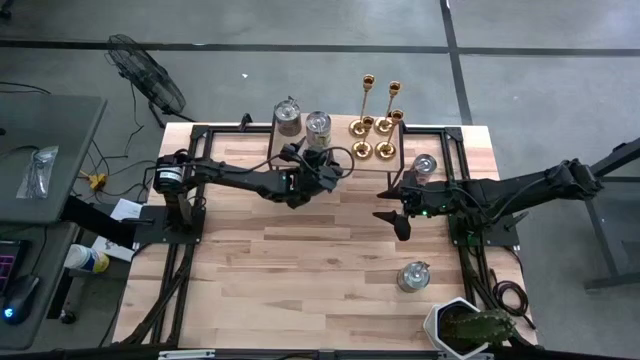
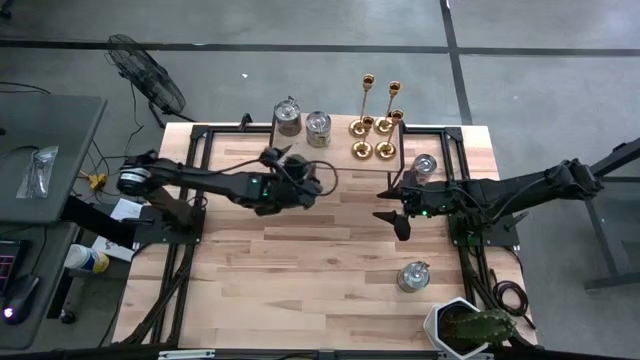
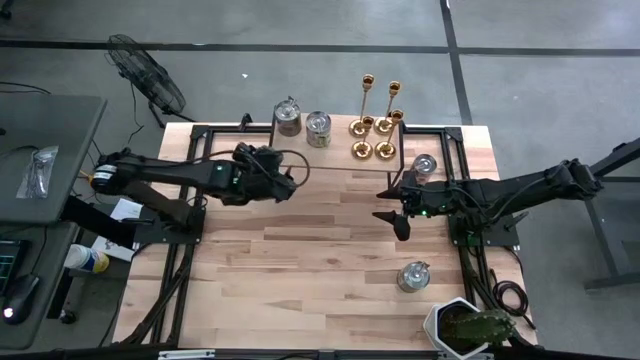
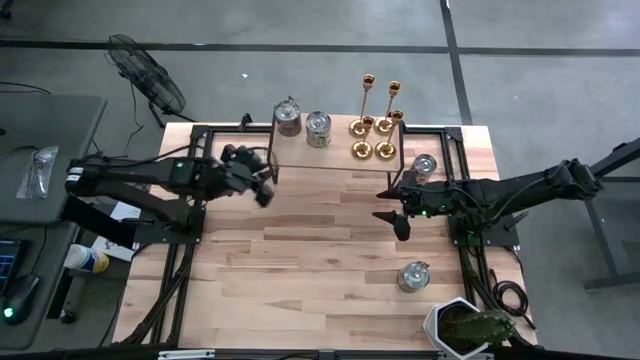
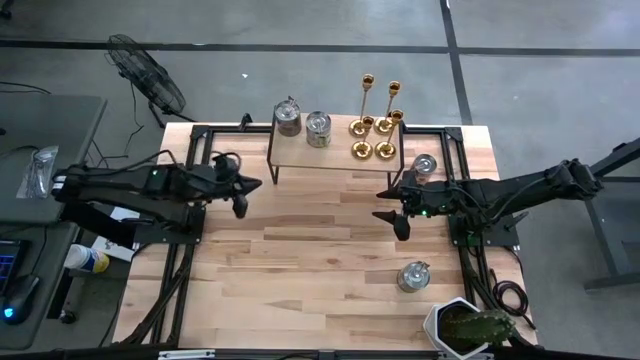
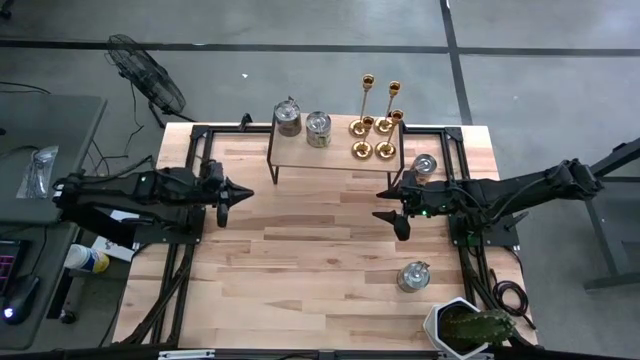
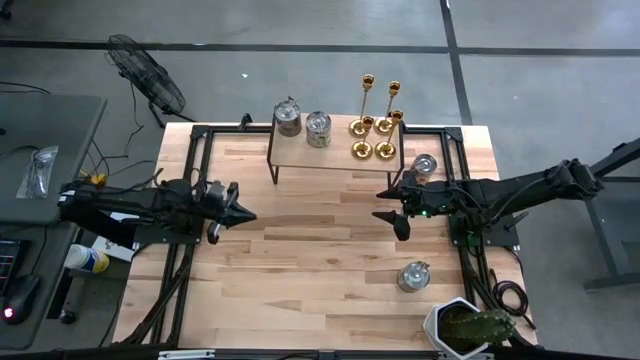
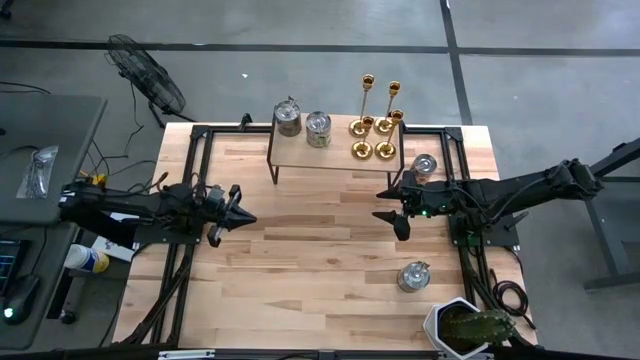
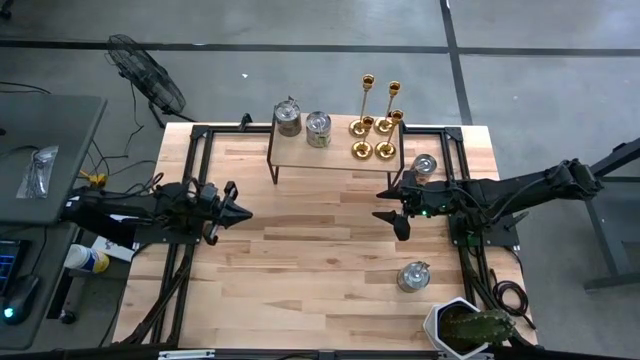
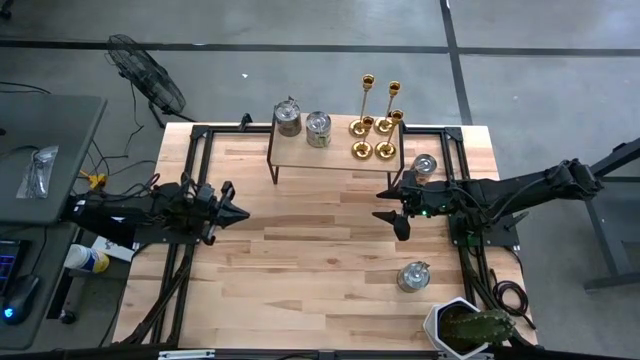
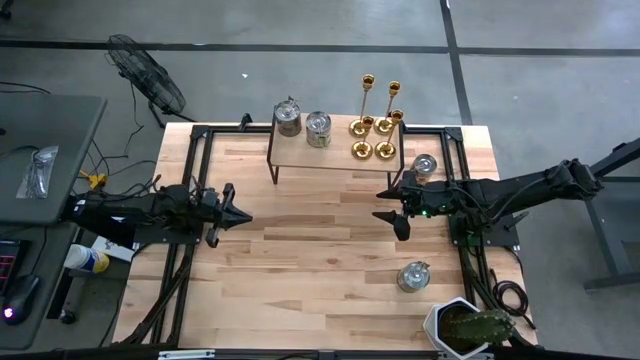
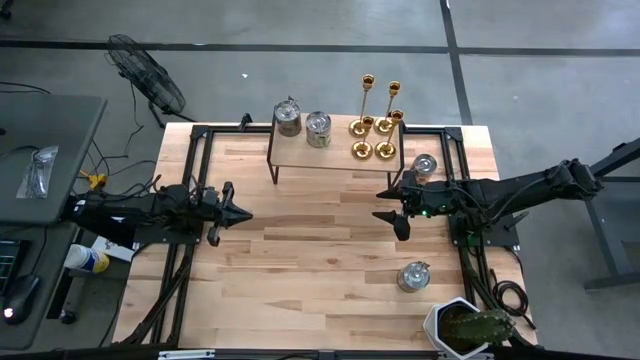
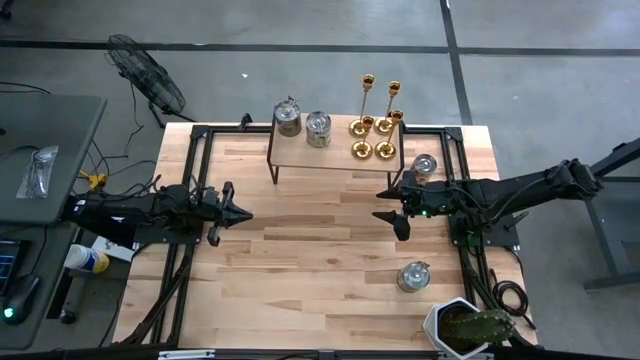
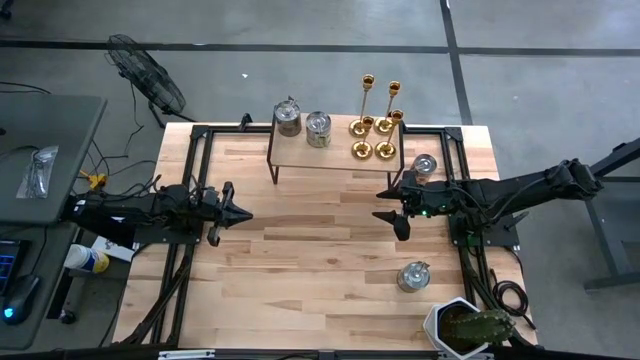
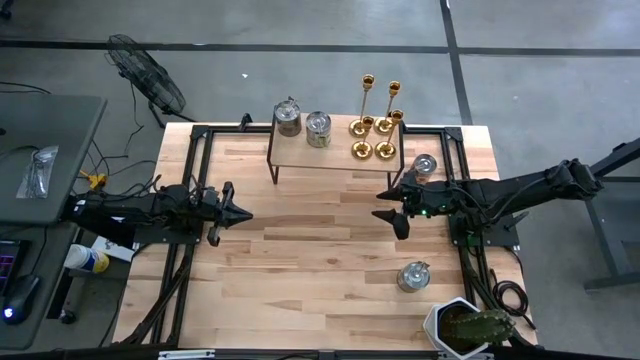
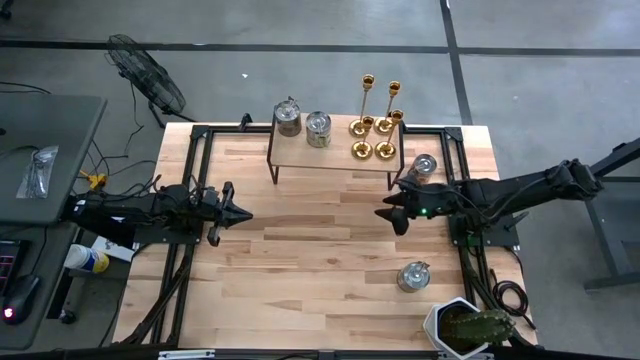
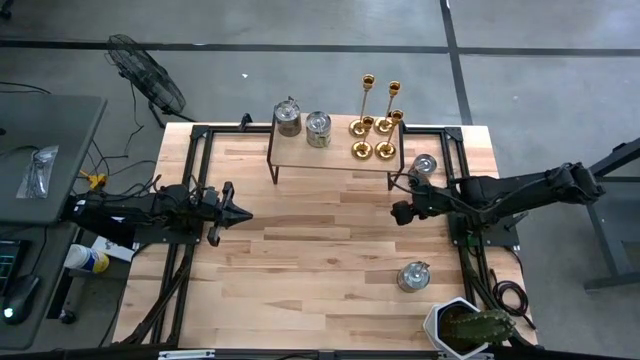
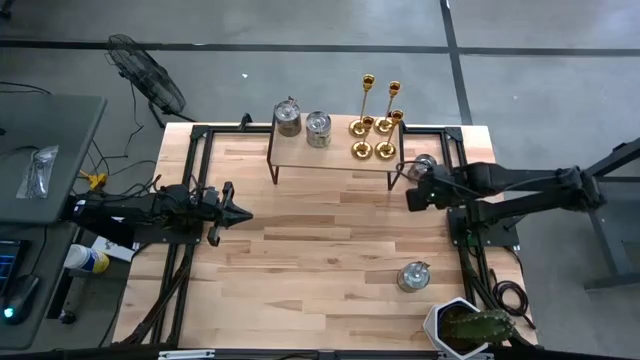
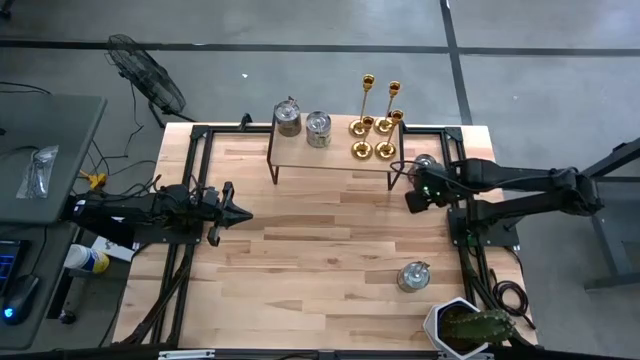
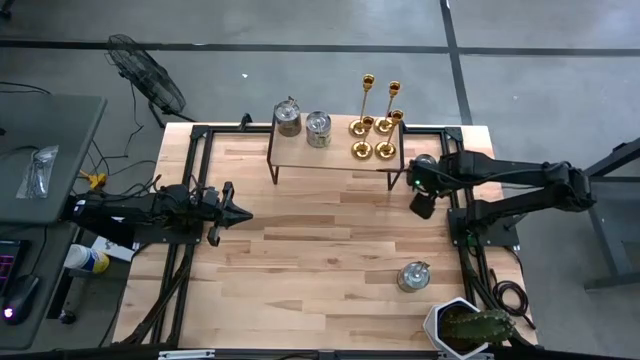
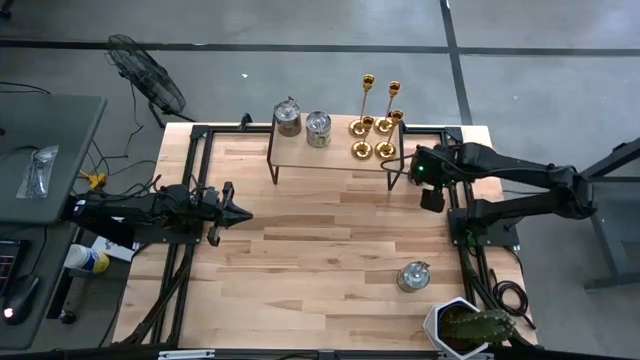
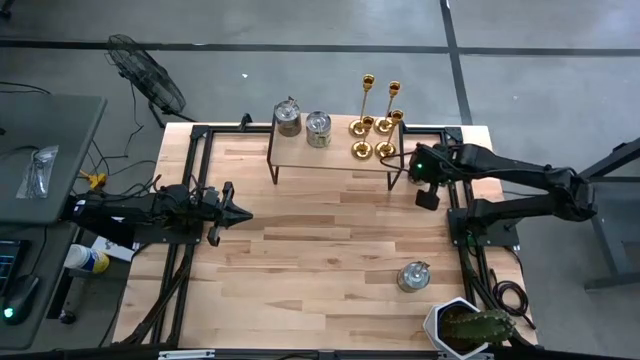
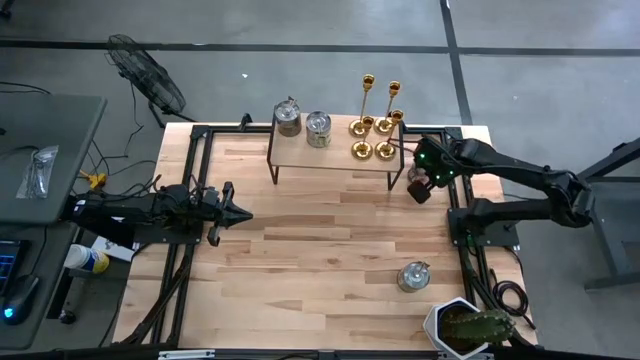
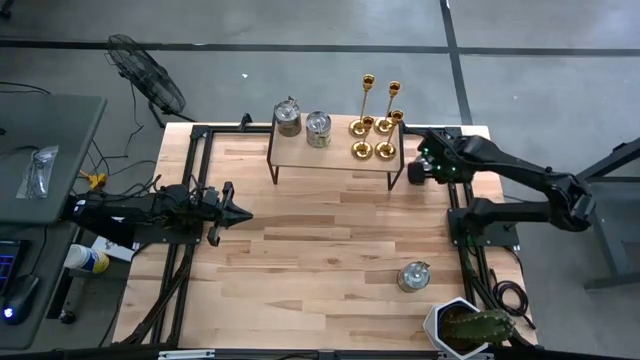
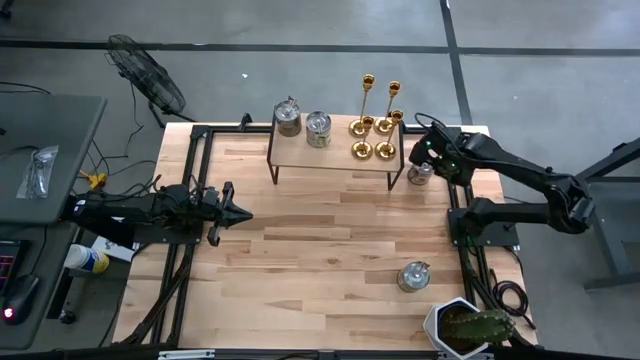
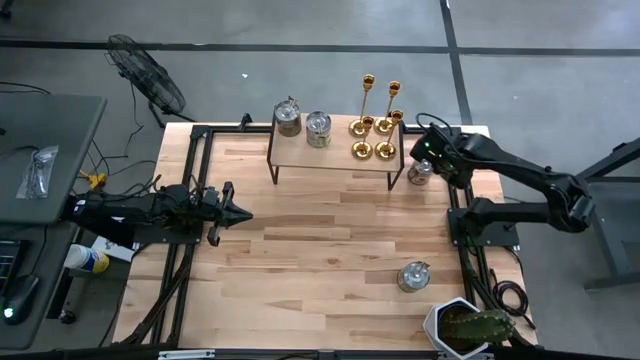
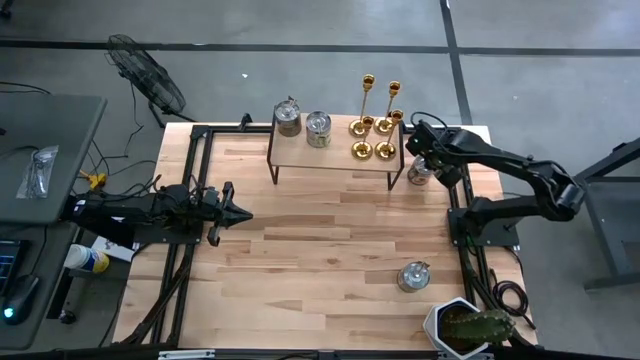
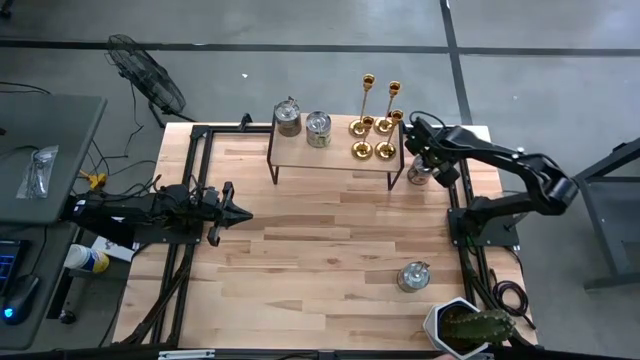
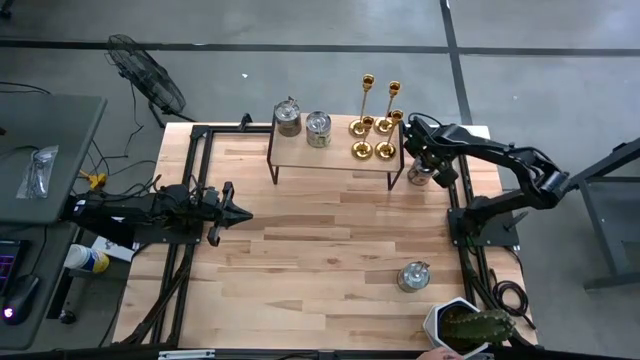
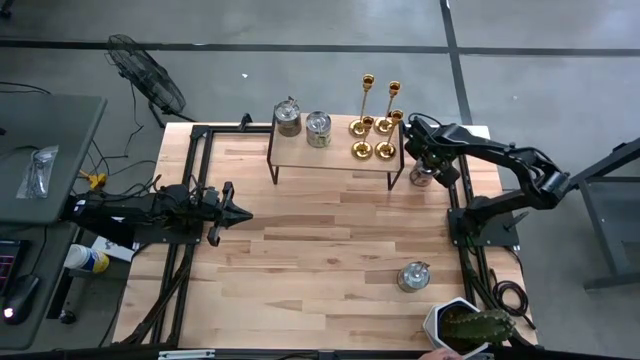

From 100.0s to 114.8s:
Task: Pick & Place candle stick holders
Align the silver scented candle on the shelf with the silver scented candle

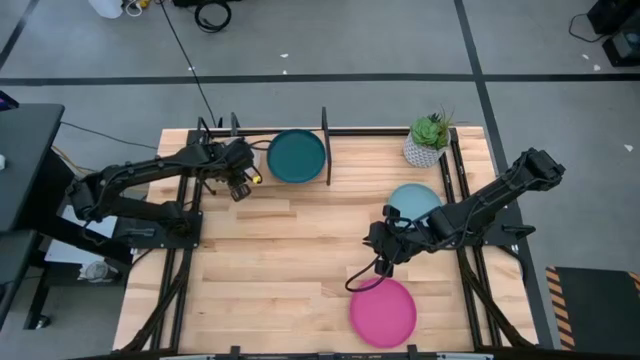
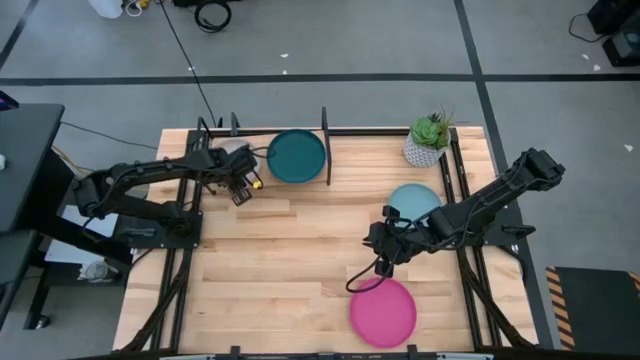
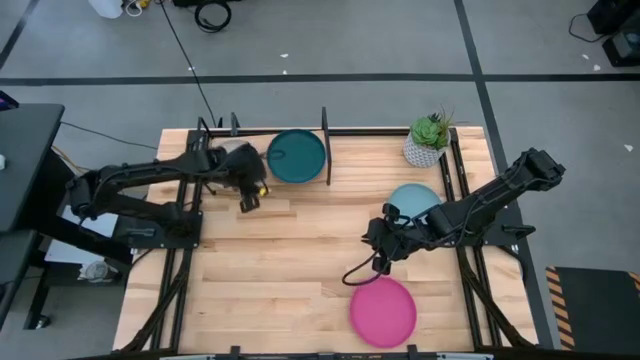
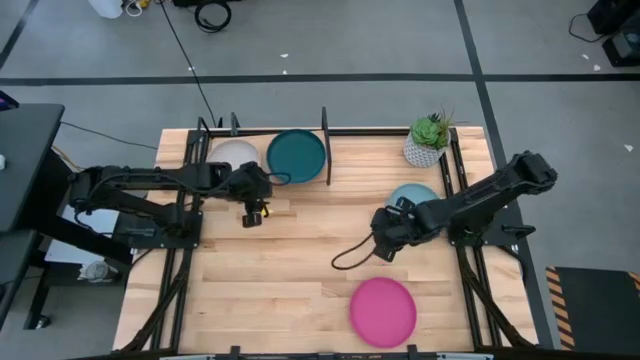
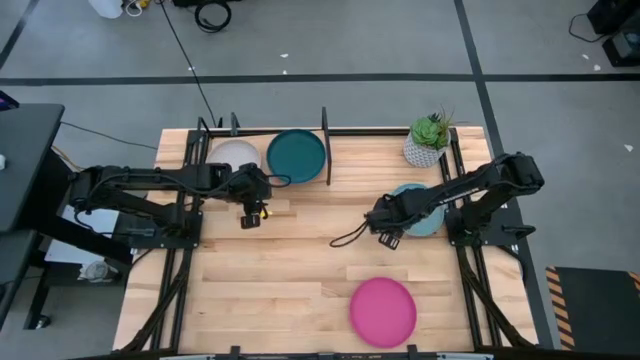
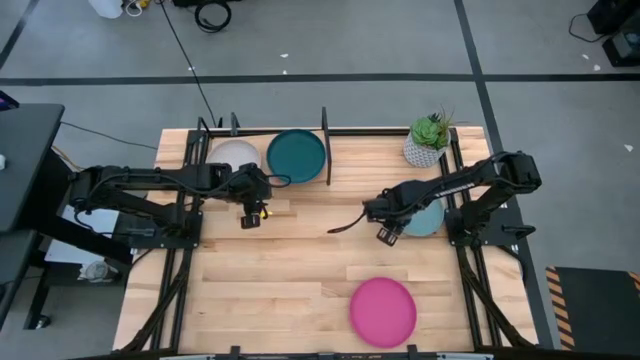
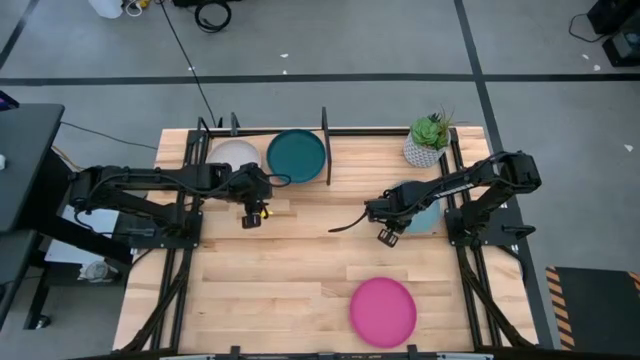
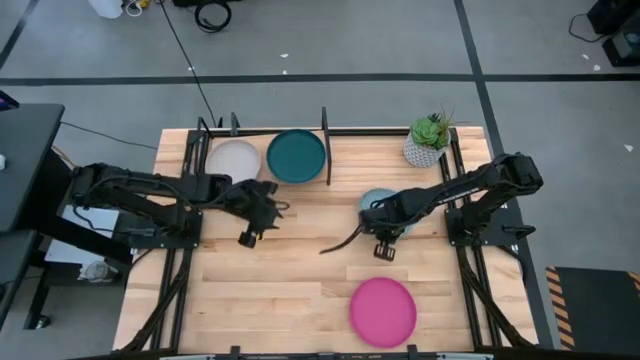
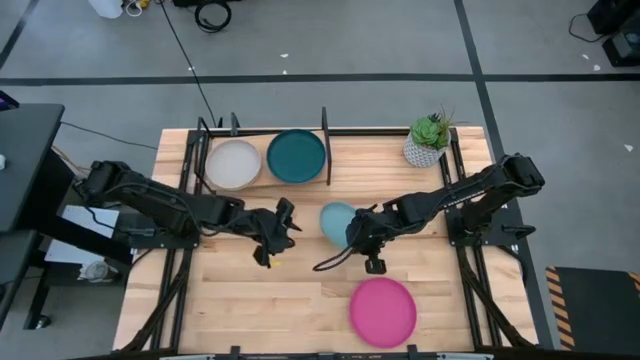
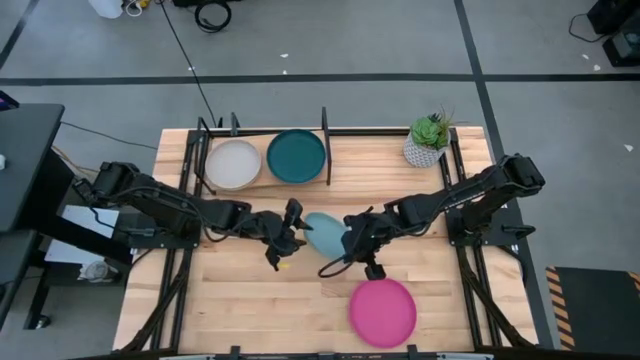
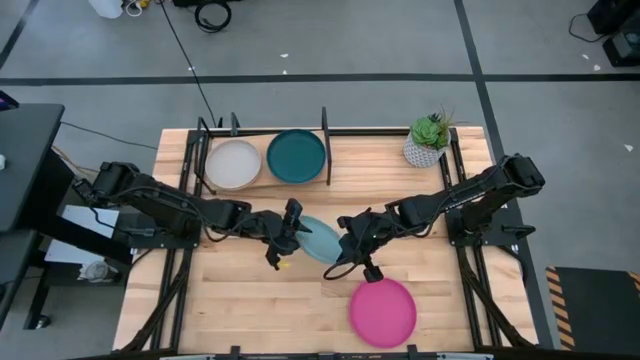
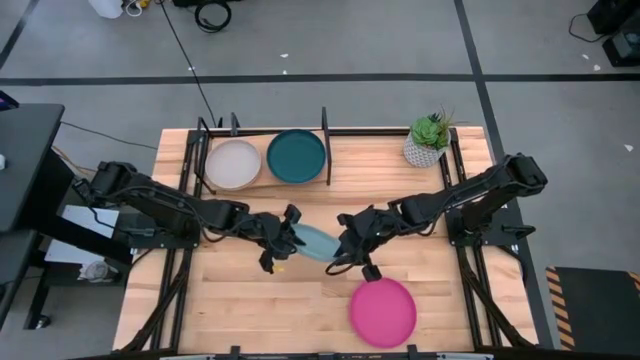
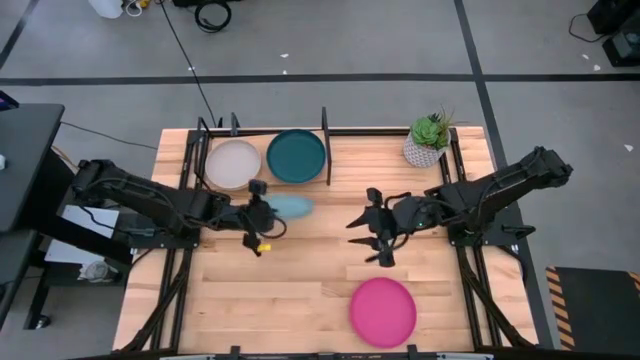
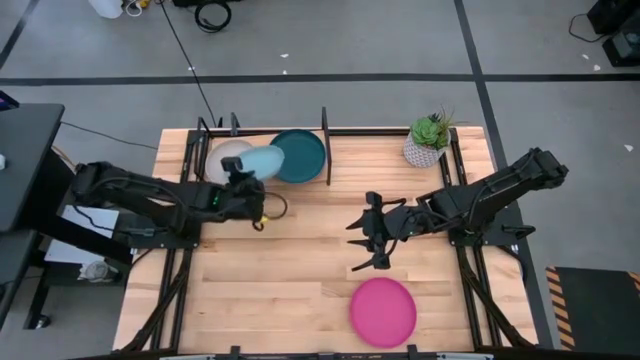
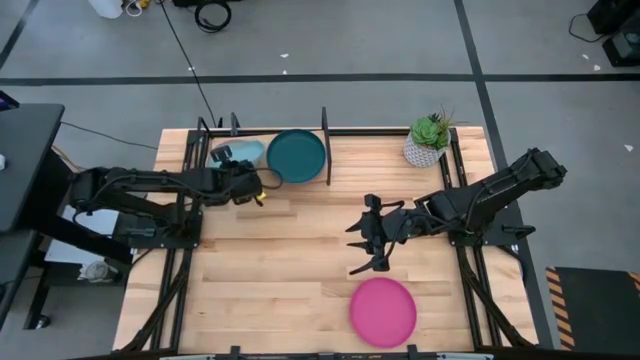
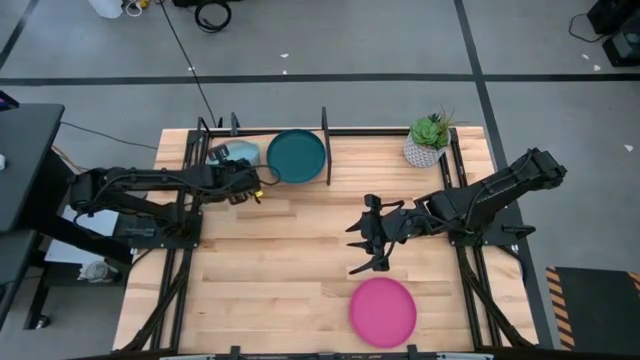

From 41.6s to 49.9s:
Task: Place and stack plates onto a shelf
Stack the light blue plate on the gray plate
